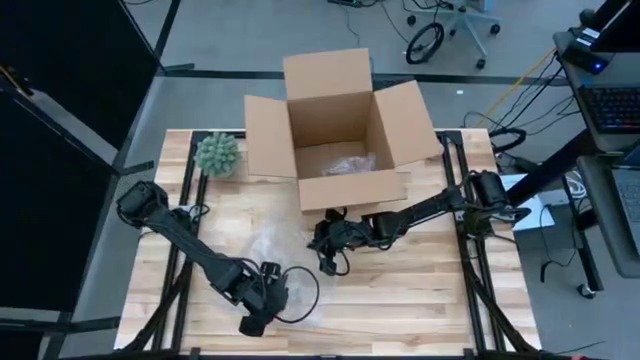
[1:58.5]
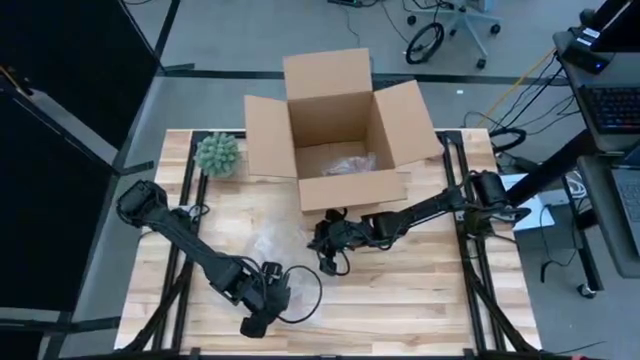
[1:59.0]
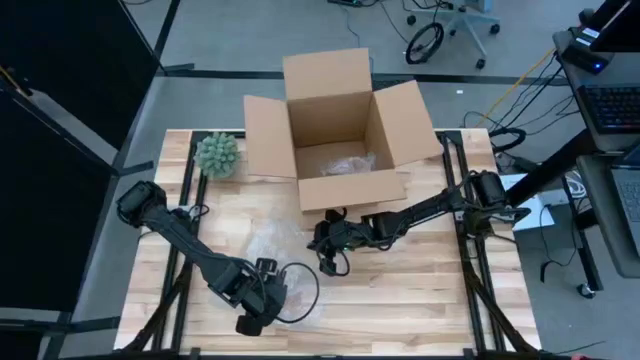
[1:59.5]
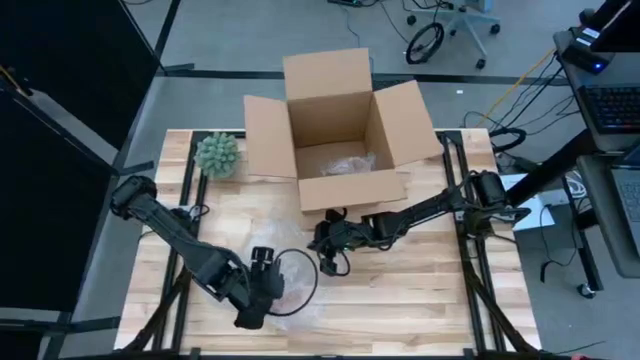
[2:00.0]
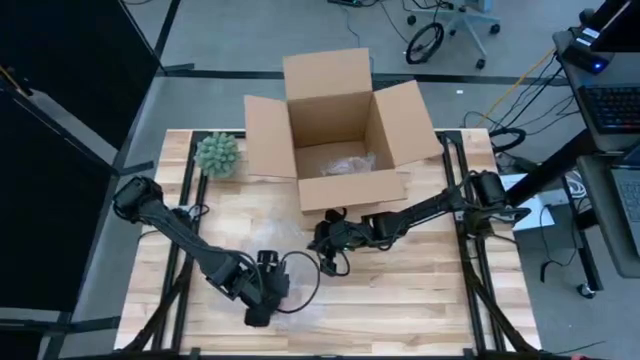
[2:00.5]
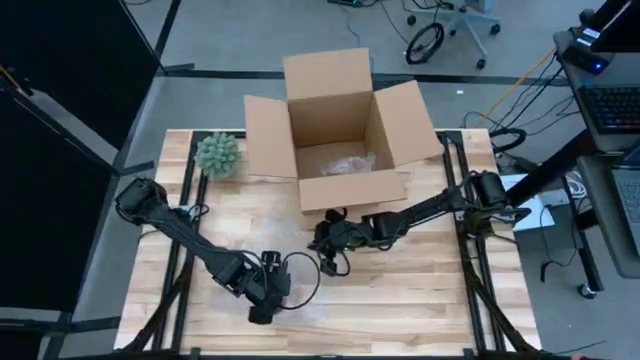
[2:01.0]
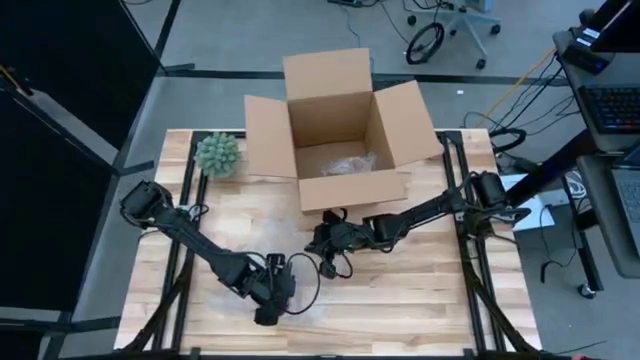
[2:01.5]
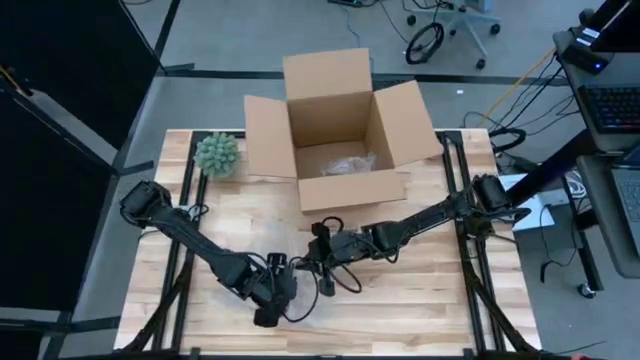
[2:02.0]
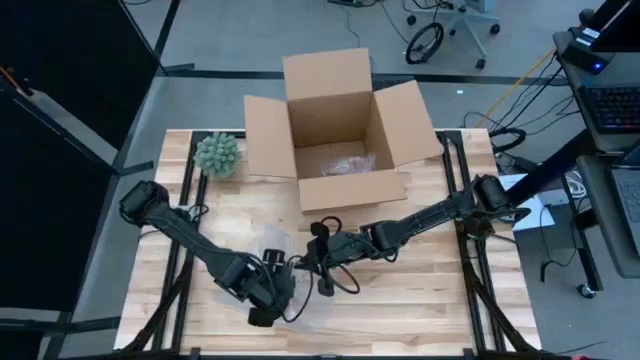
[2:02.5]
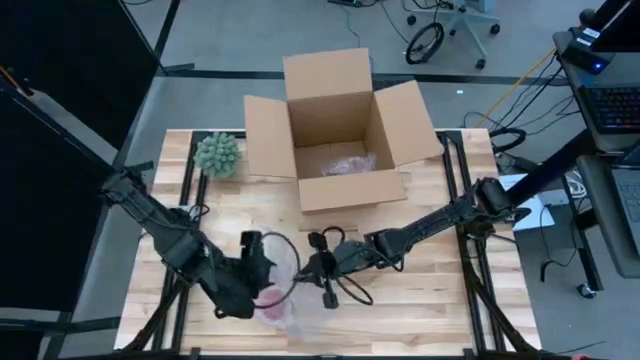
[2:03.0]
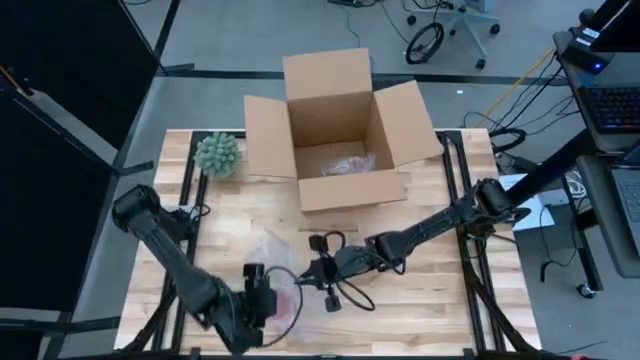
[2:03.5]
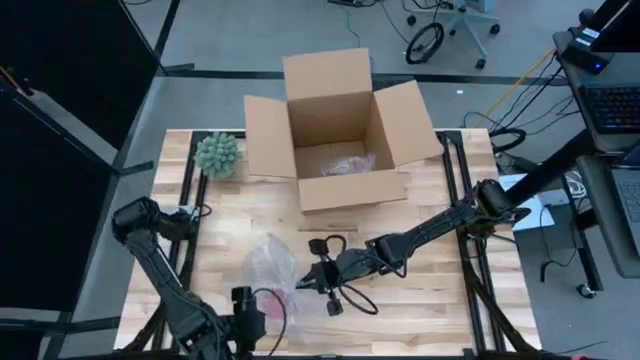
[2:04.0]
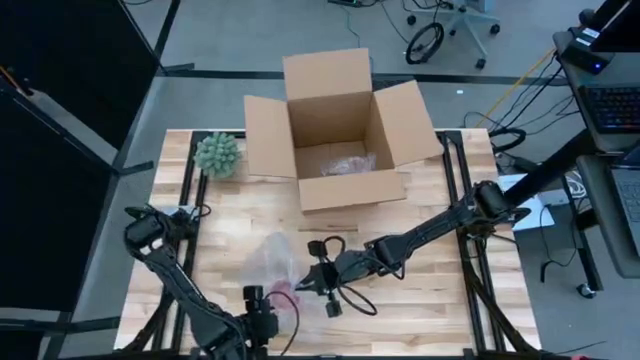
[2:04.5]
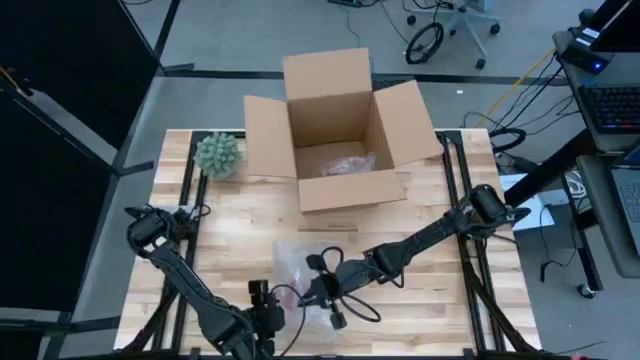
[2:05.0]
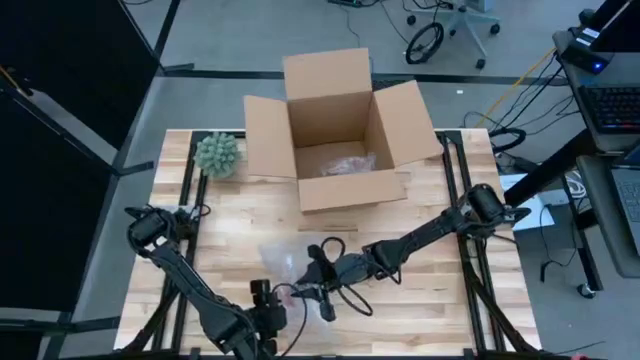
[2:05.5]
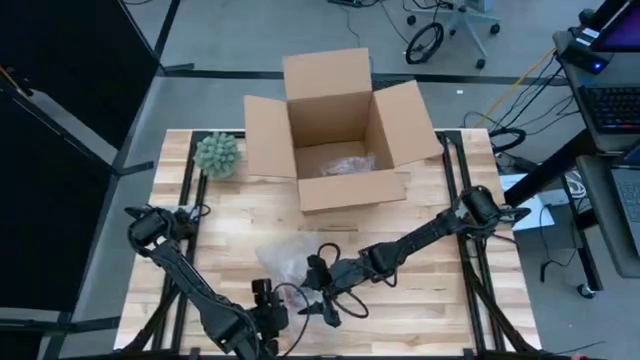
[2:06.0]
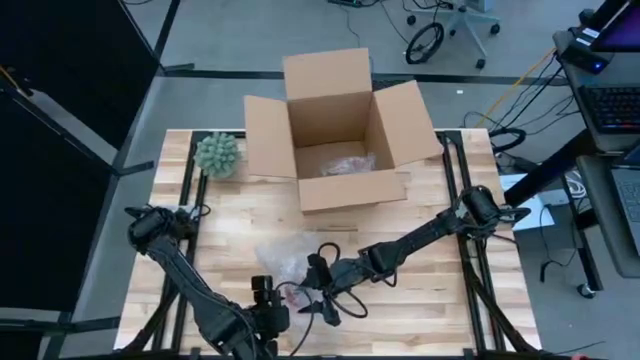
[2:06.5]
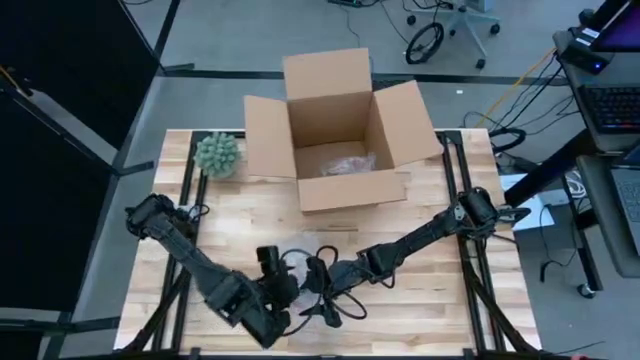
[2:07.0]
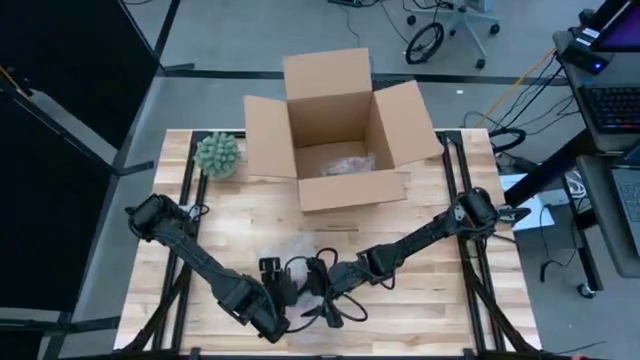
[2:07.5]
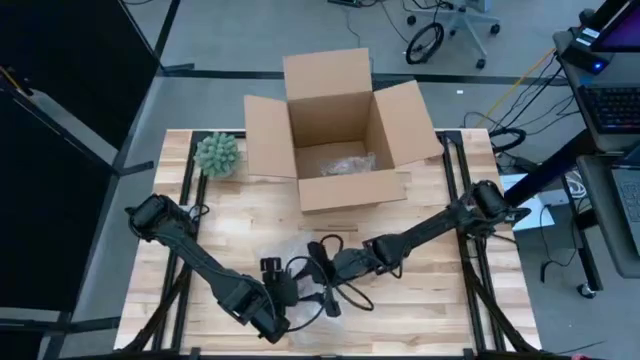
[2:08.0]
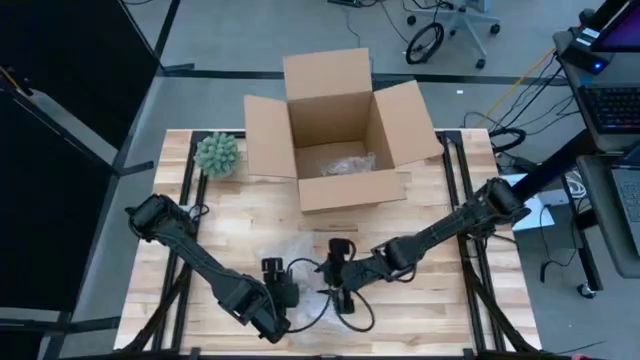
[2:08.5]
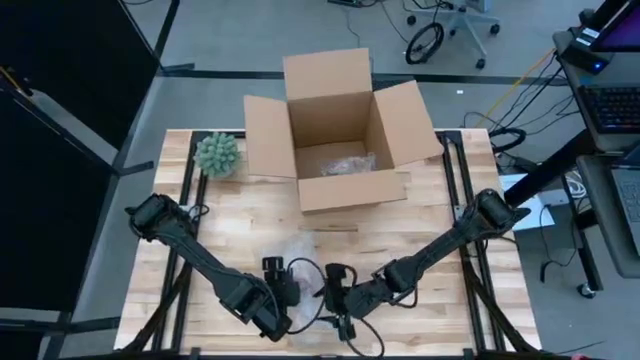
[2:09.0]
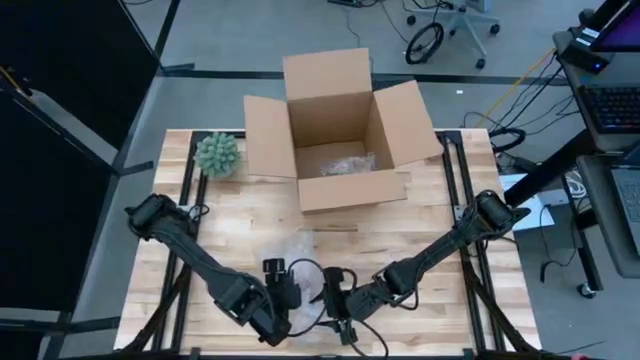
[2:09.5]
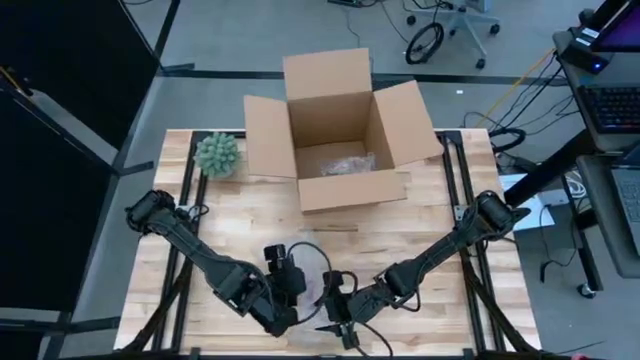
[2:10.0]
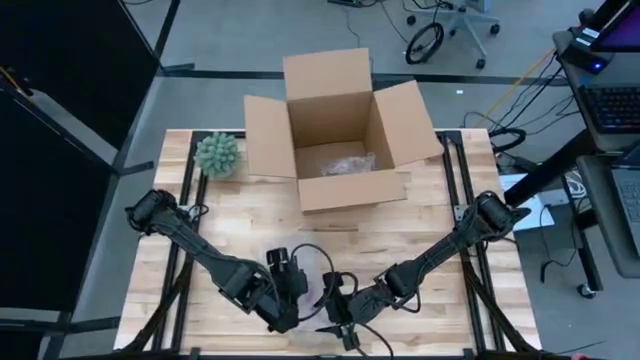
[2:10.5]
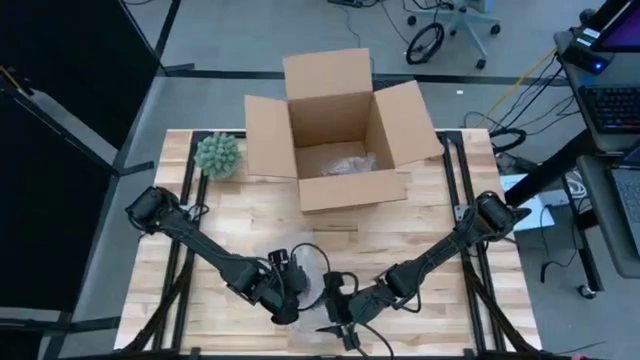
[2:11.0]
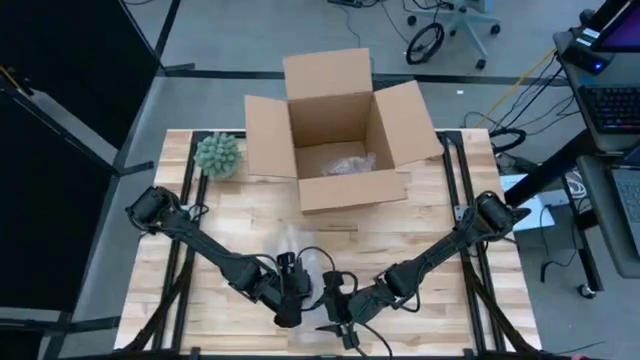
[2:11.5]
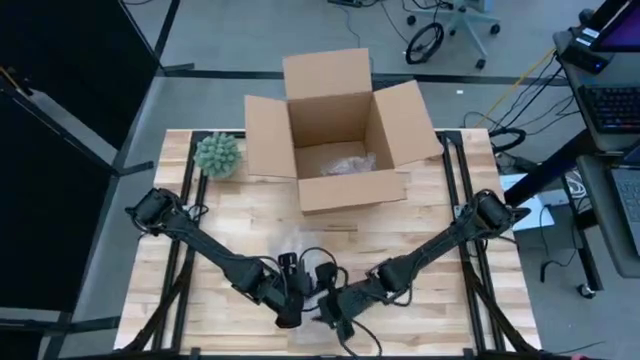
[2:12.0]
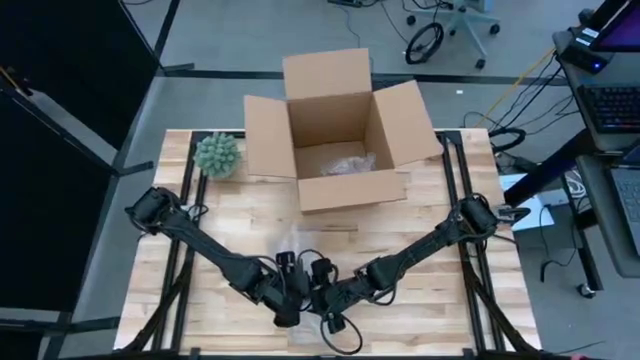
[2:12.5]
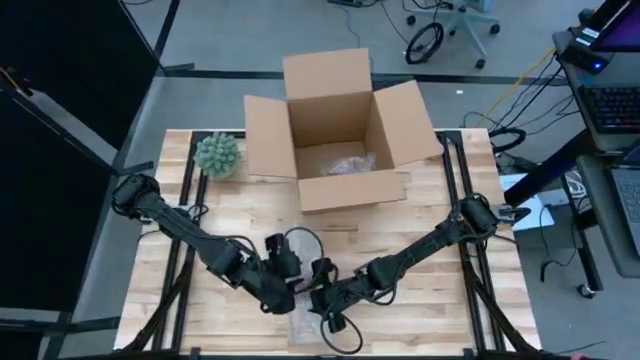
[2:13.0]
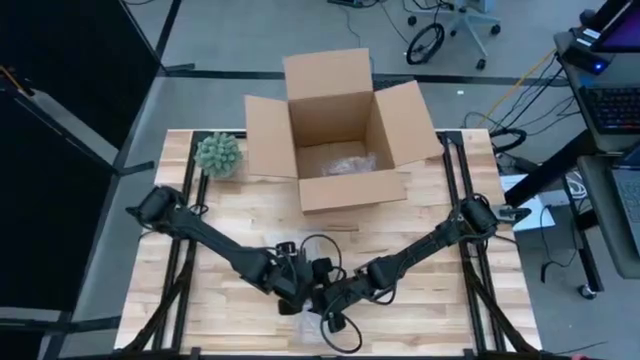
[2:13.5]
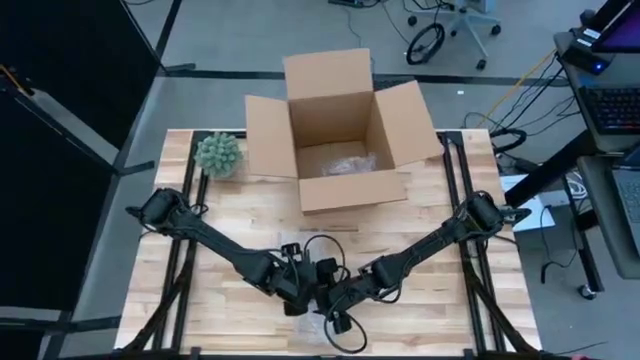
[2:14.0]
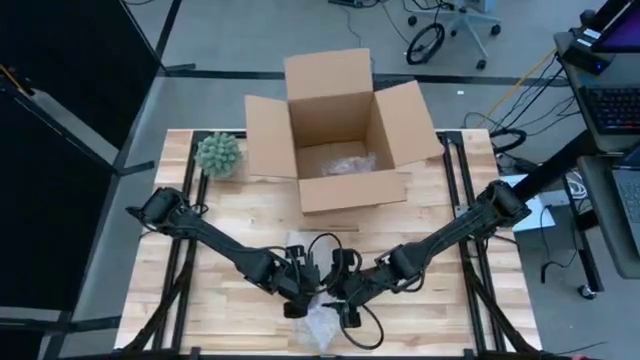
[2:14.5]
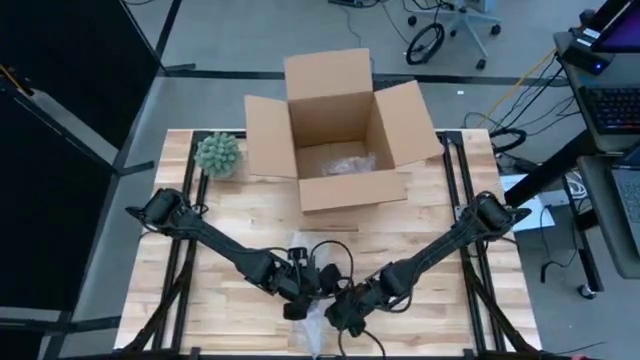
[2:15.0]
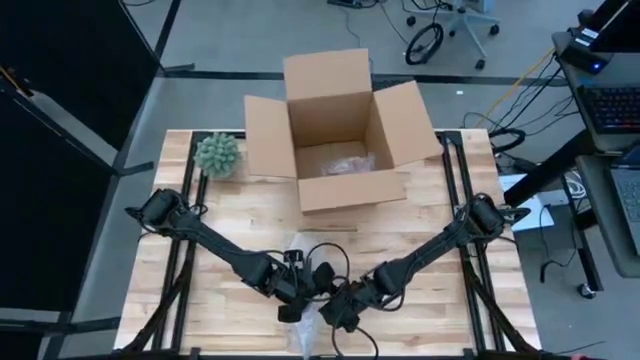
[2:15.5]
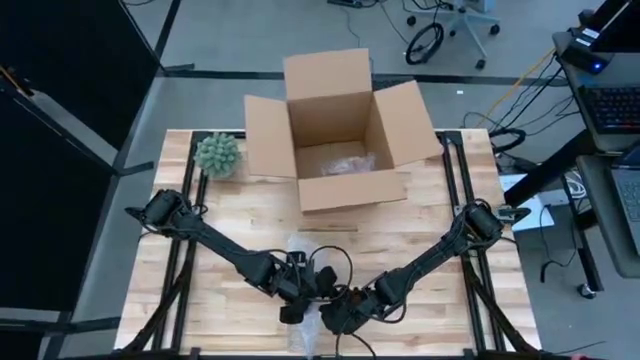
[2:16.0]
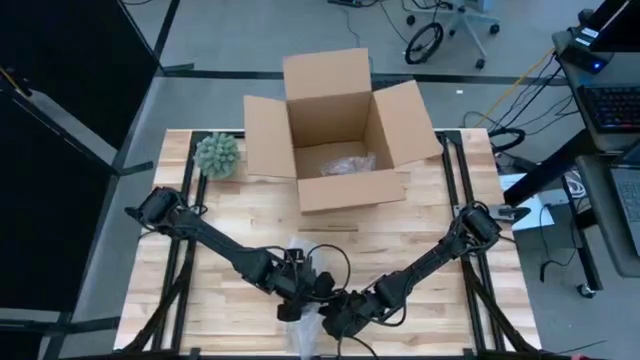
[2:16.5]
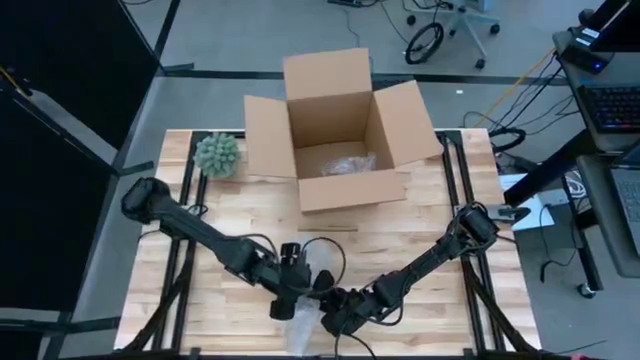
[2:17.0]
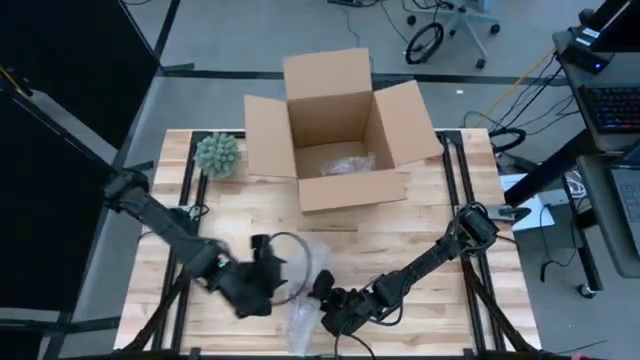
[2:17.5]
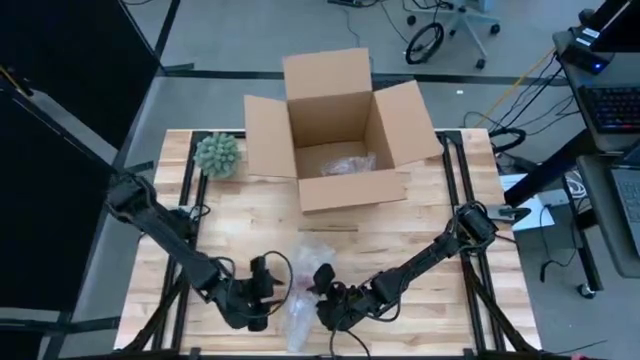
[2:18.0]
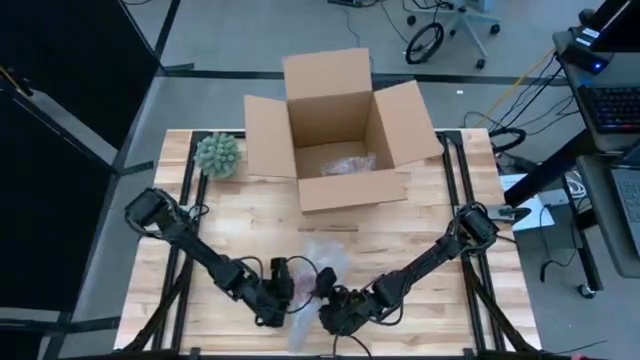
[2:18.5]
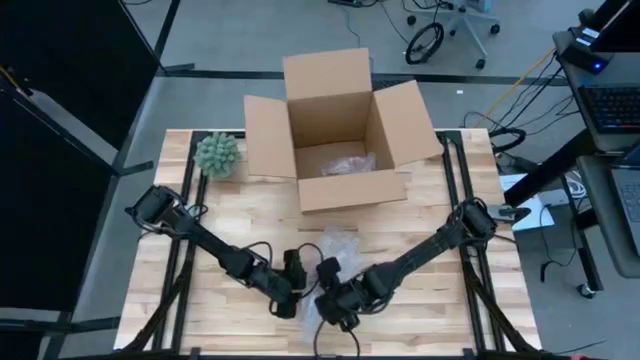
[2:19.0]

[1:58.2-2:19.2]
Task: wrap mug
Wrap the pink mug with bubble wrap
